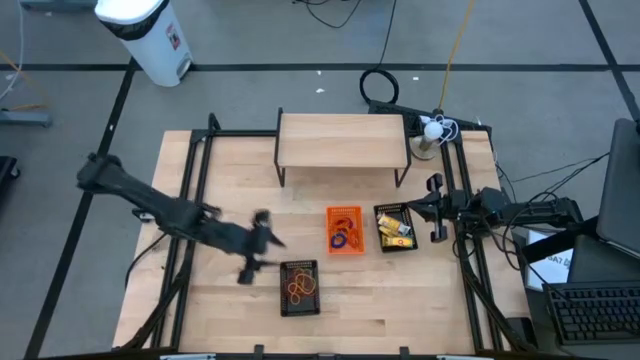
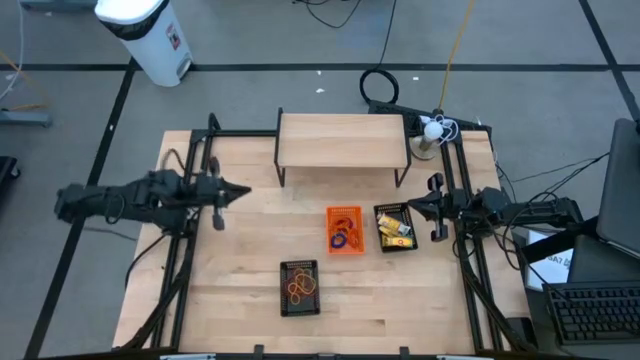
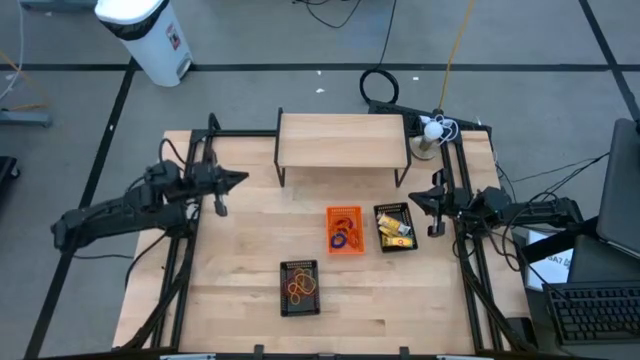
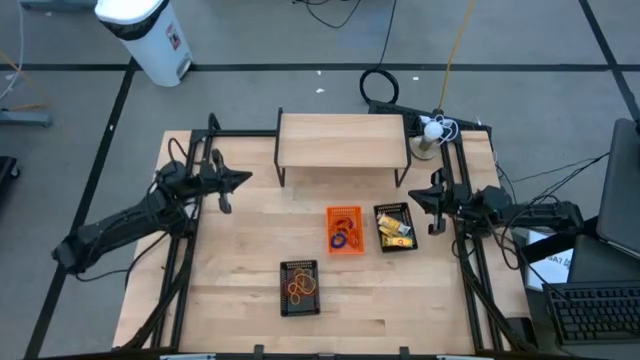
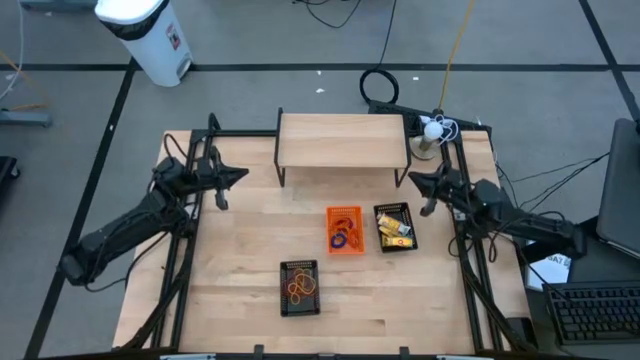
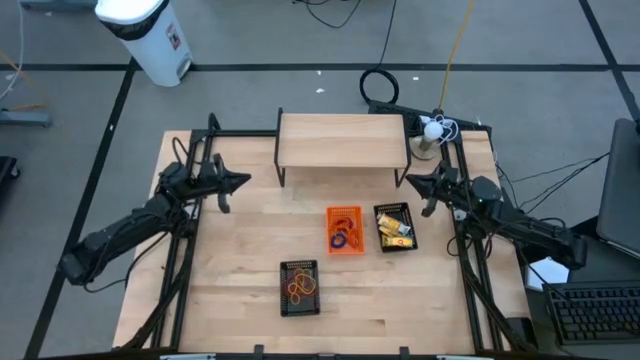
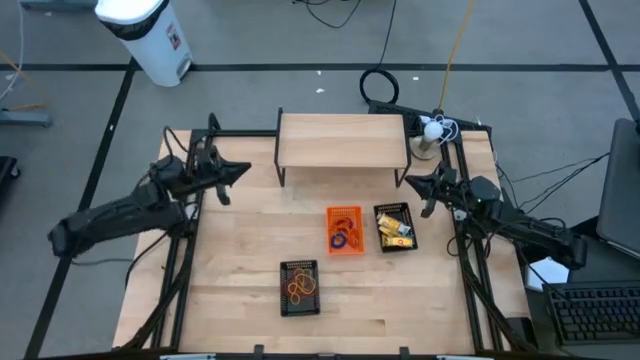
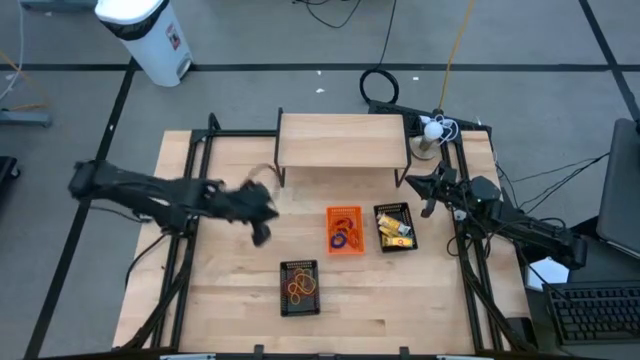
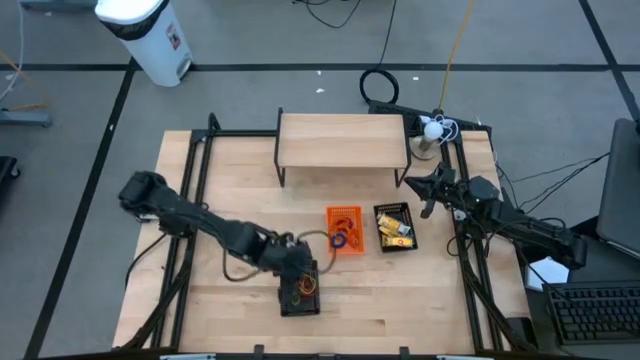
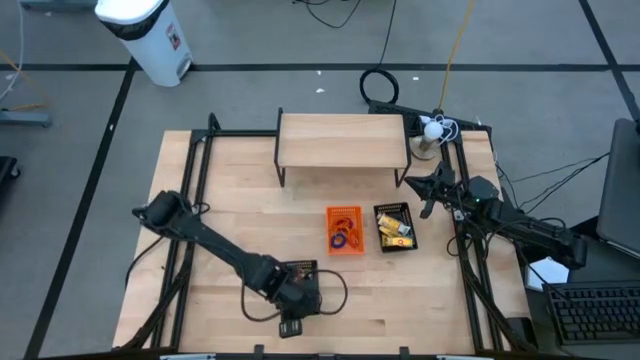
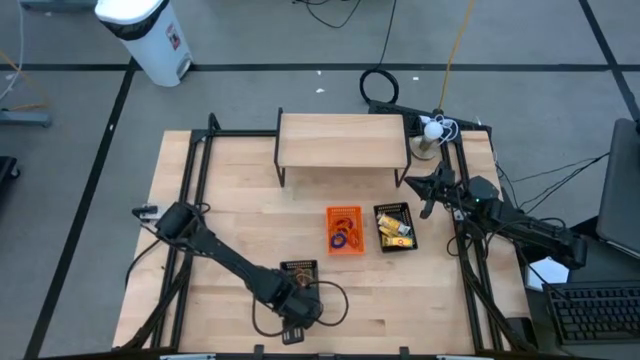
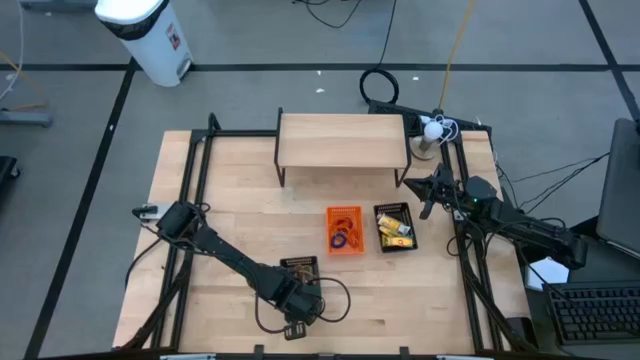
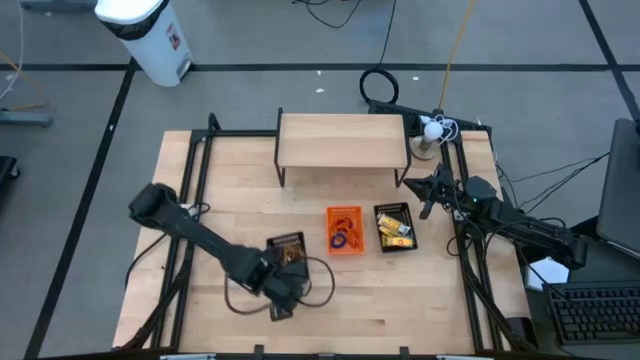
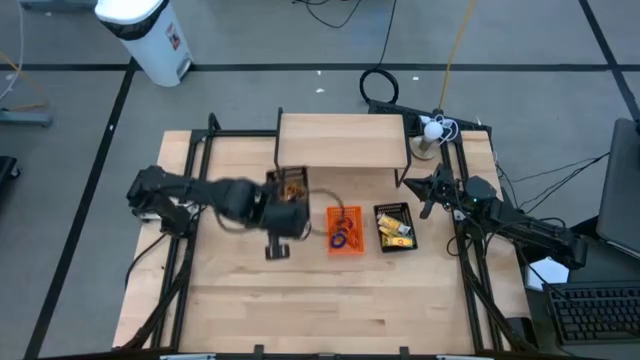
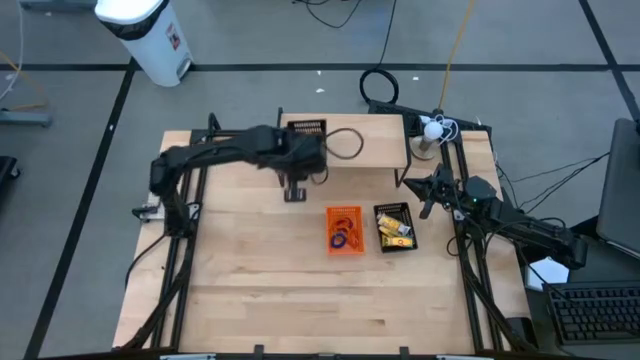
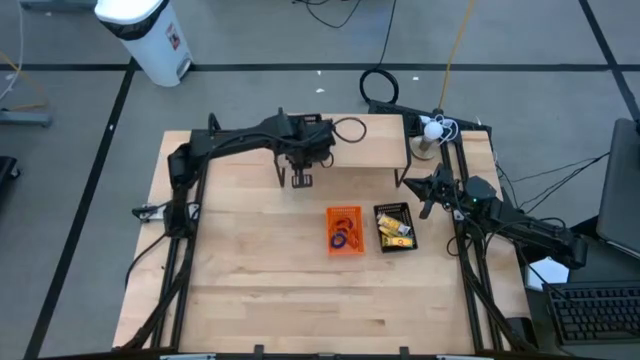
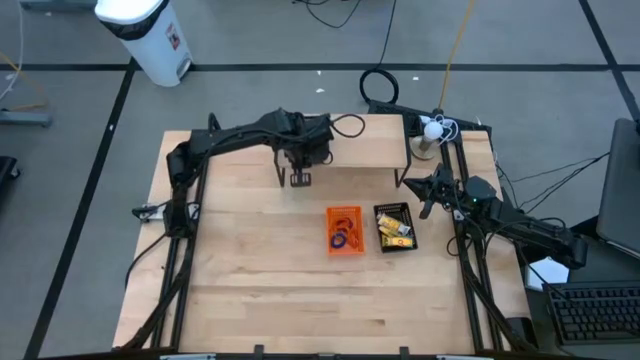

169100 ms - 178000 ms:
Task: Pick & Place Office Desk Supplies
Put the bottom black bin on the shelf

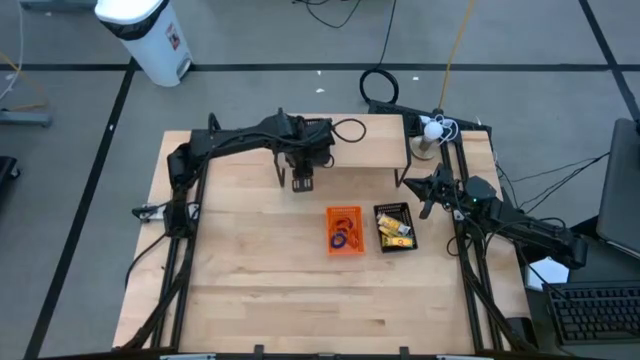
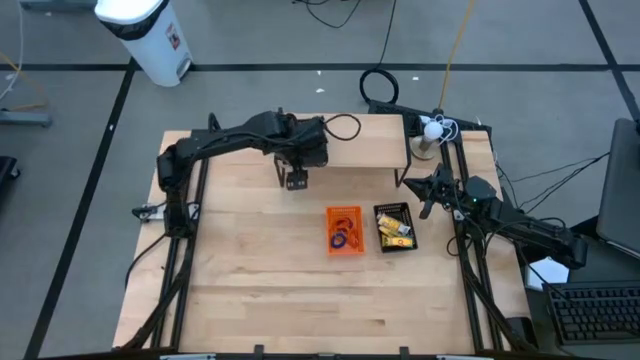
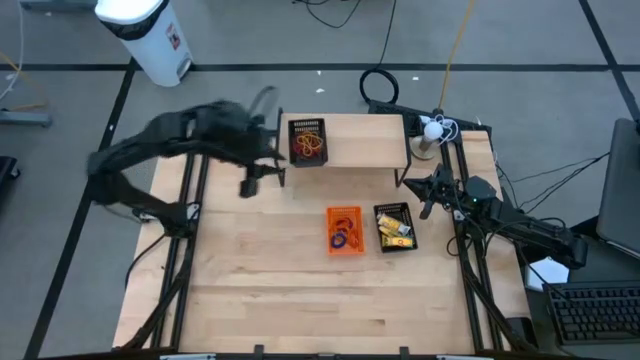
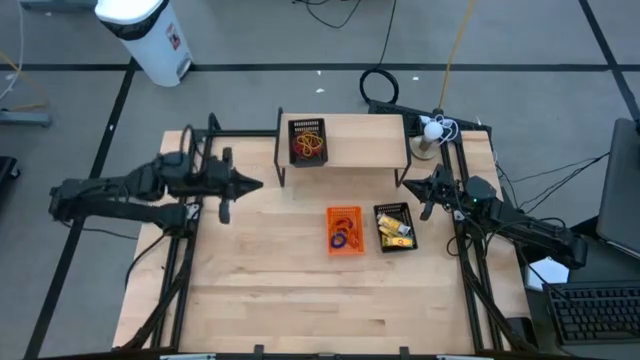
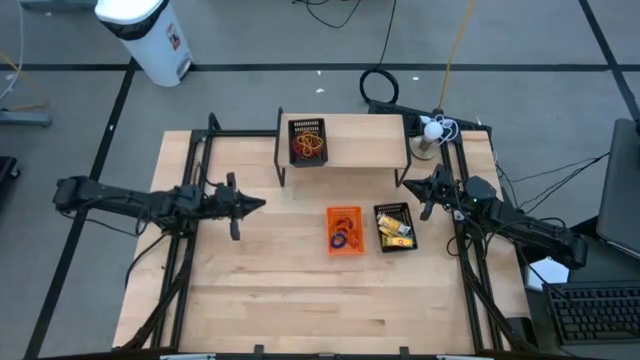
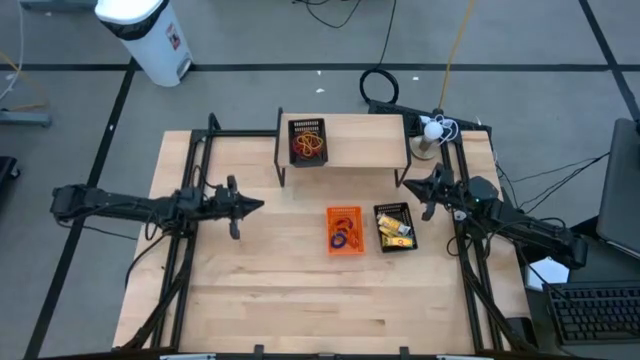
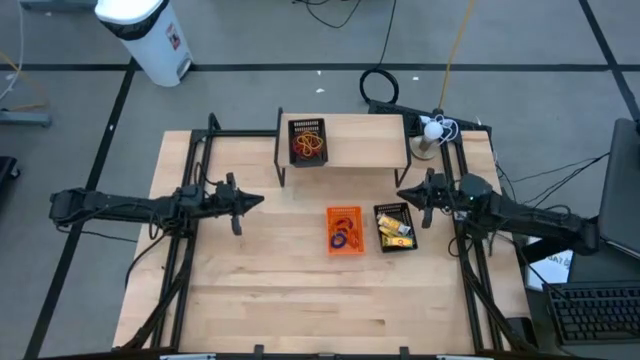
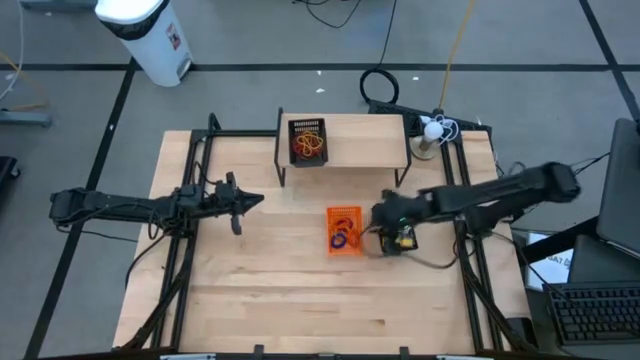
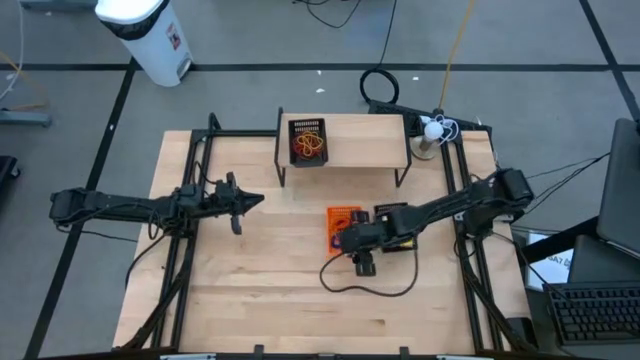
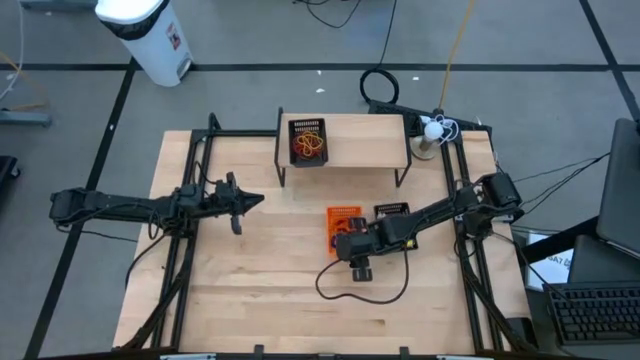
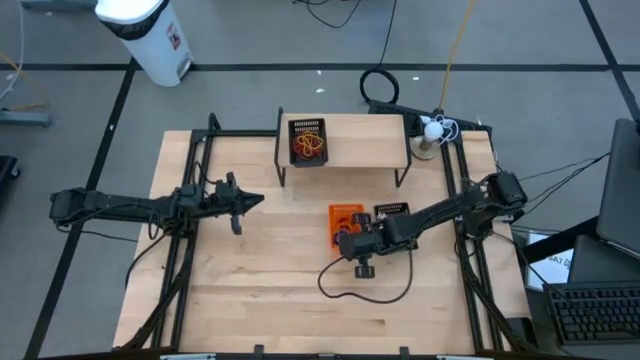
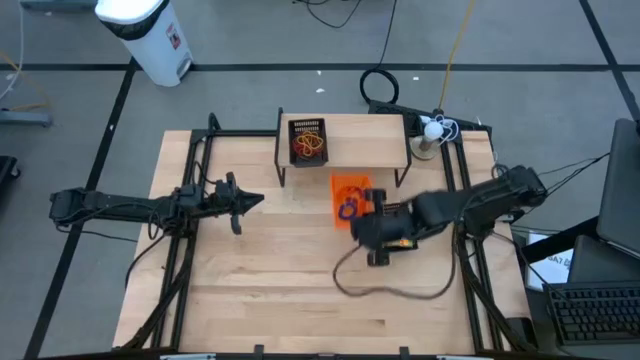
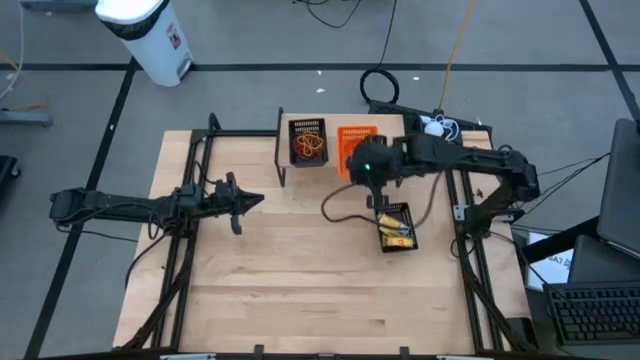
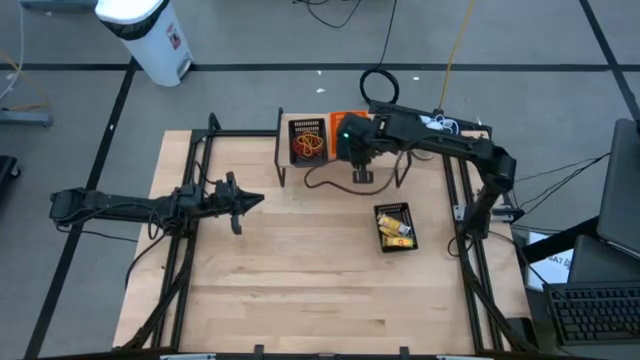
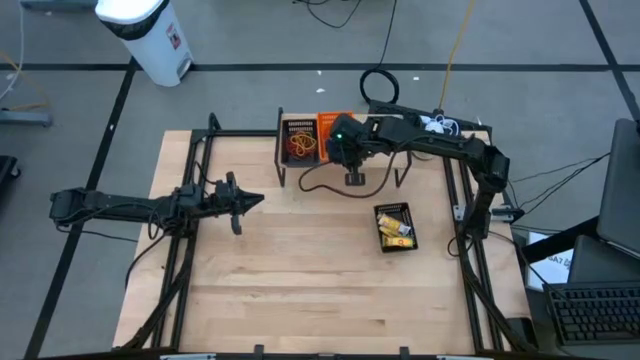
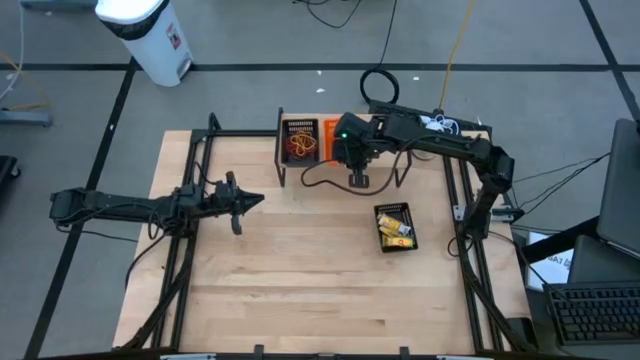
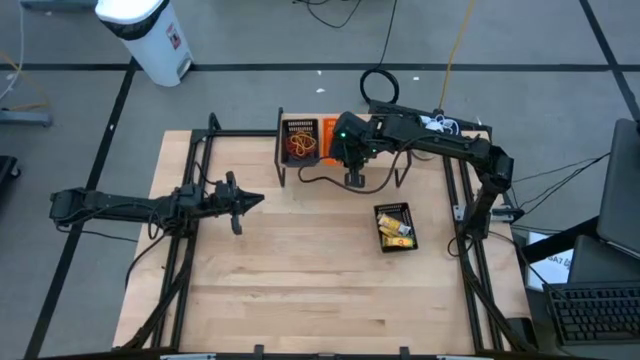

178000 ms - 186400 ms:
Put the orange bin on the shelf

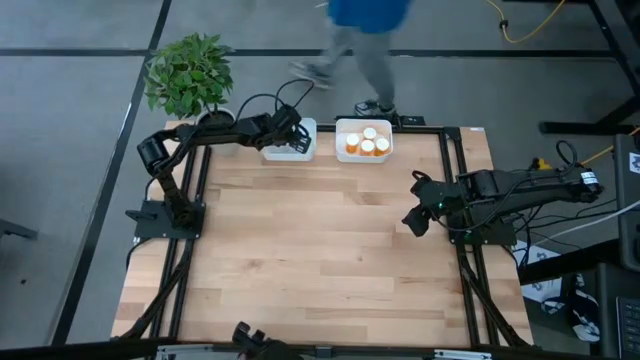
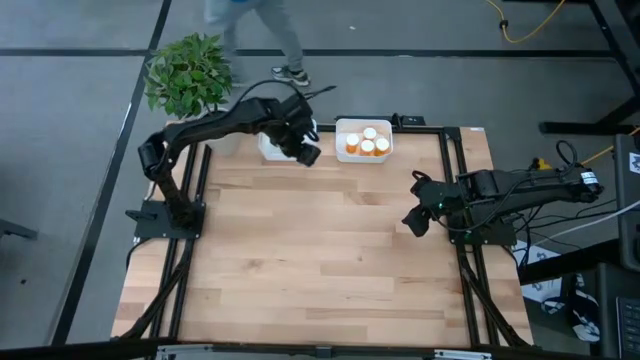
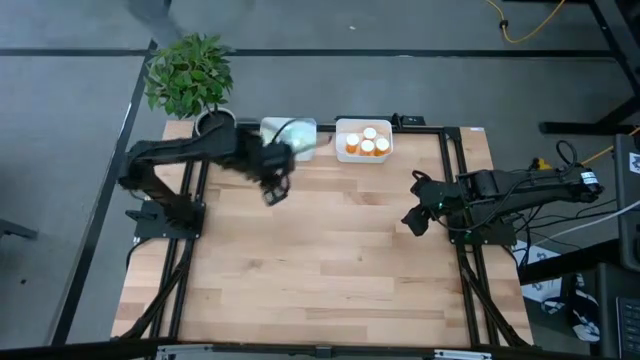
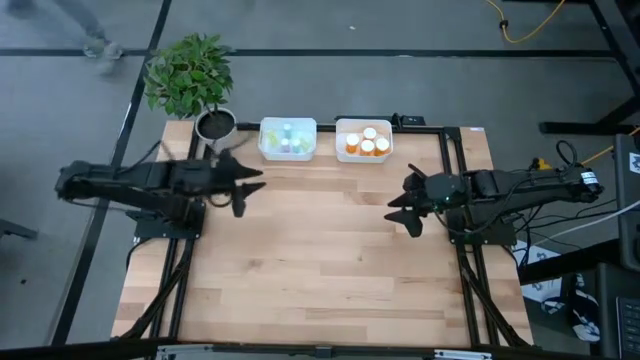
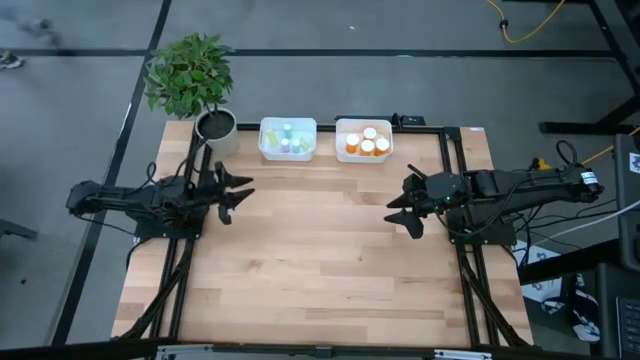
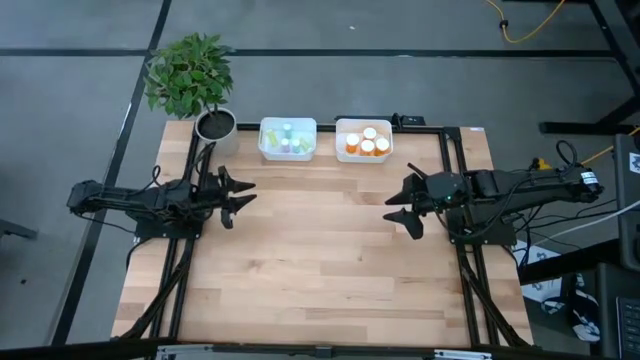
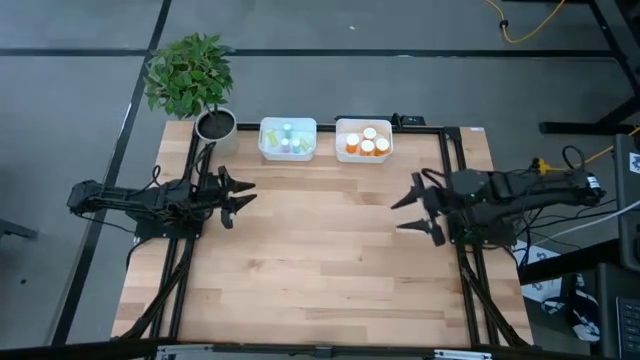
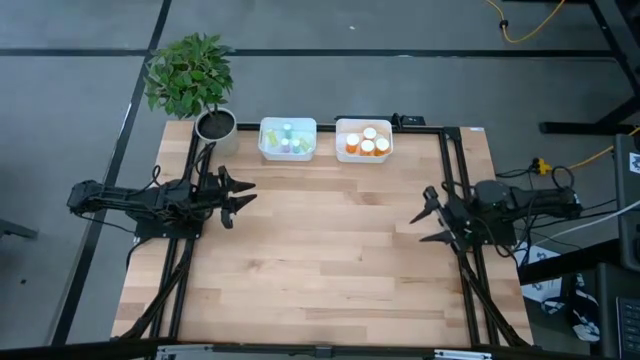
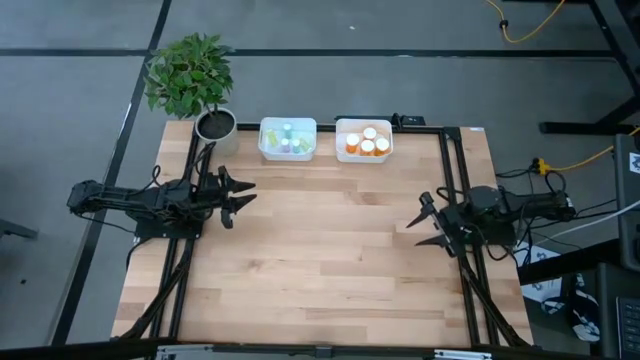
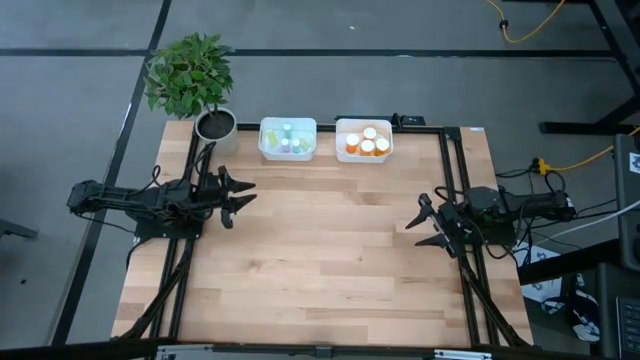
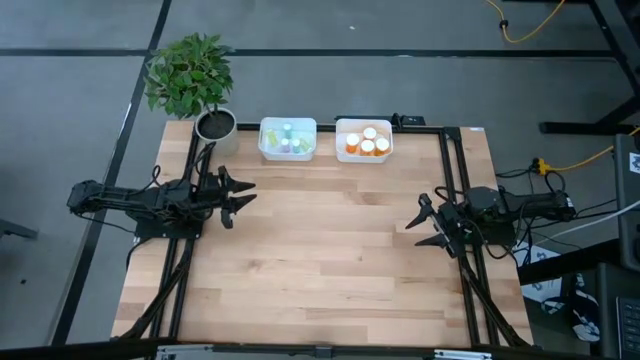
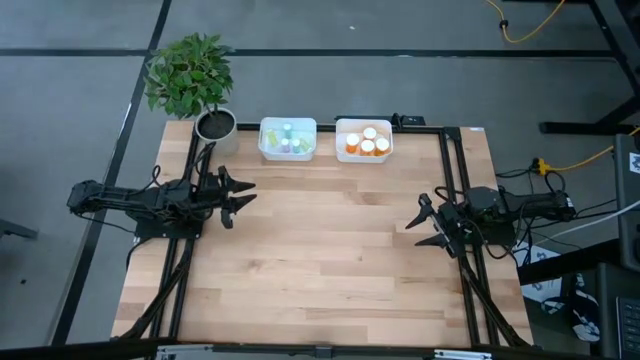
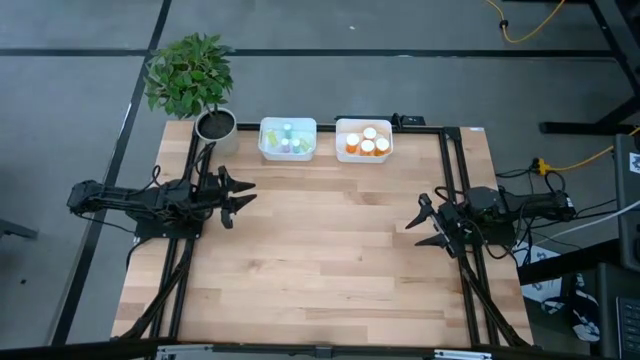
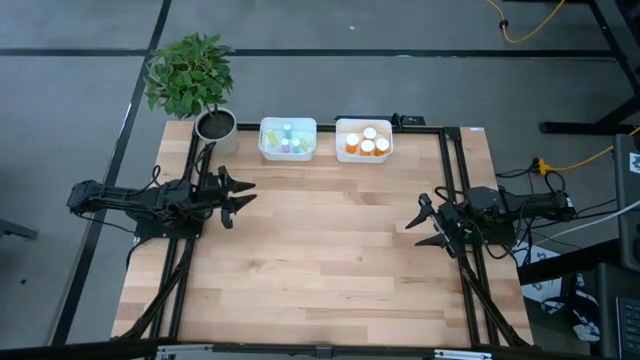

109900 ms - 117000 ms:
Task: Pick and place medicine bottles into bin by pill shape (circle, oval)
Return to Home Position
